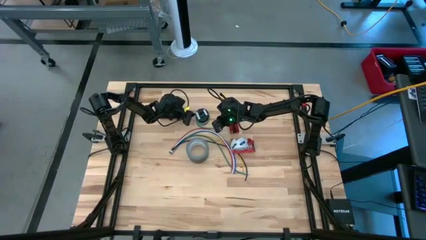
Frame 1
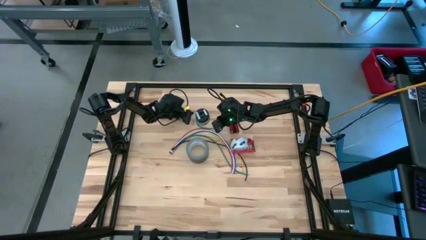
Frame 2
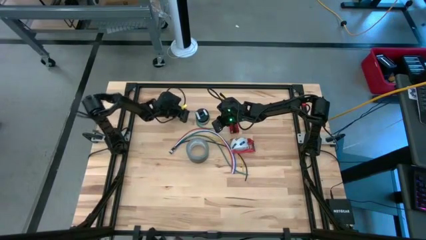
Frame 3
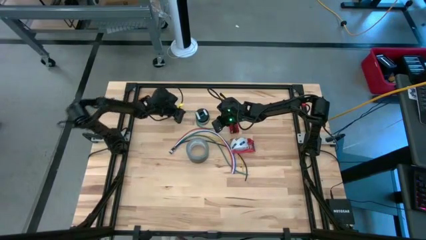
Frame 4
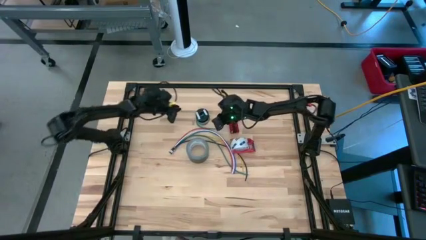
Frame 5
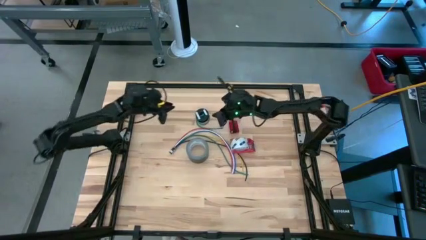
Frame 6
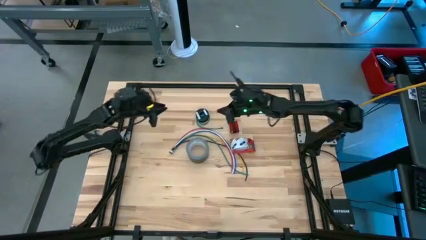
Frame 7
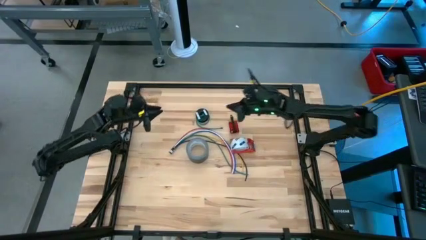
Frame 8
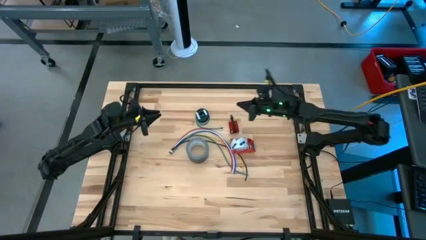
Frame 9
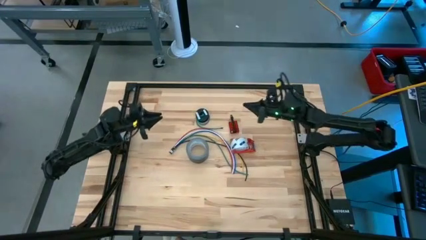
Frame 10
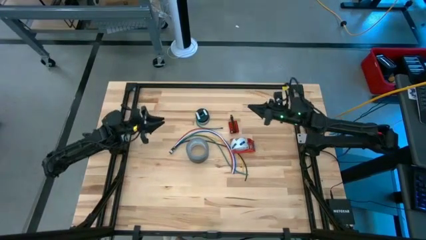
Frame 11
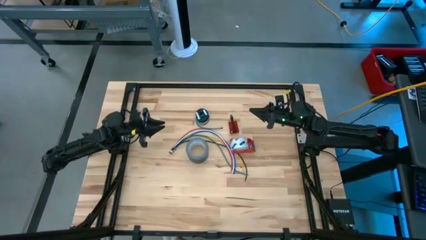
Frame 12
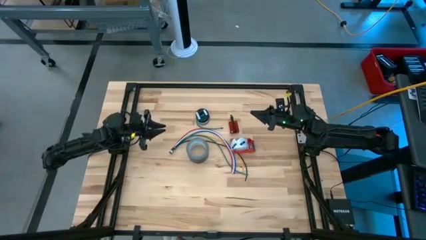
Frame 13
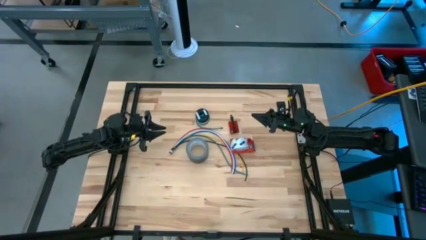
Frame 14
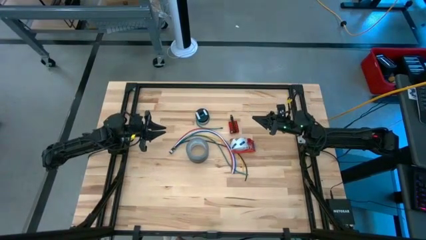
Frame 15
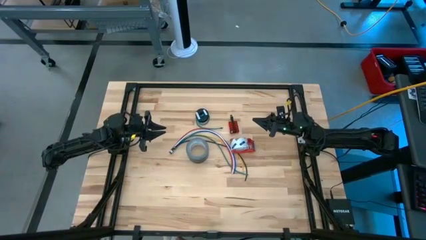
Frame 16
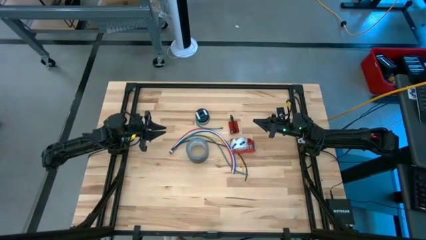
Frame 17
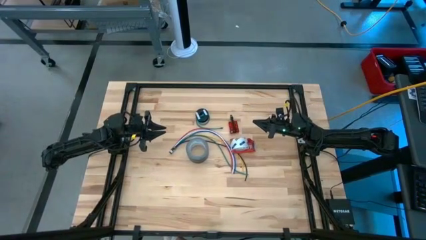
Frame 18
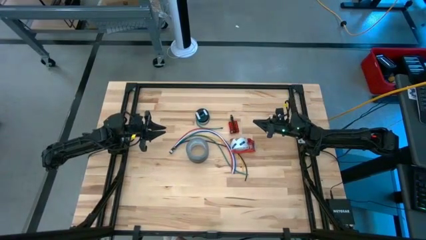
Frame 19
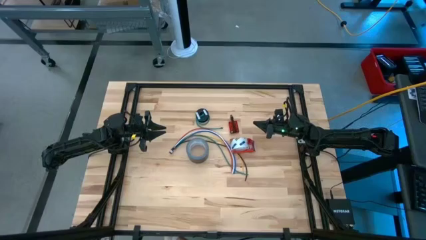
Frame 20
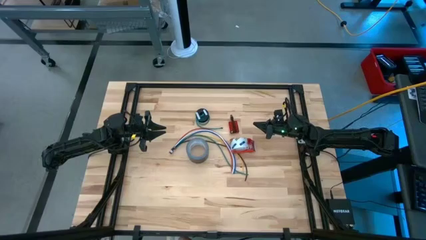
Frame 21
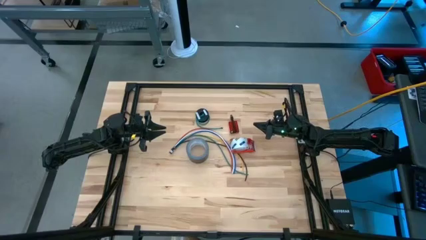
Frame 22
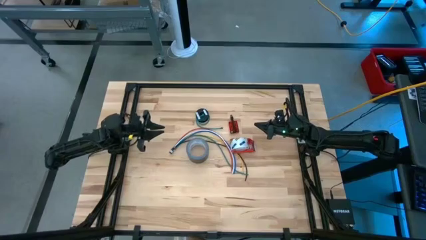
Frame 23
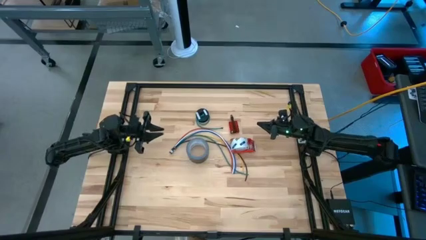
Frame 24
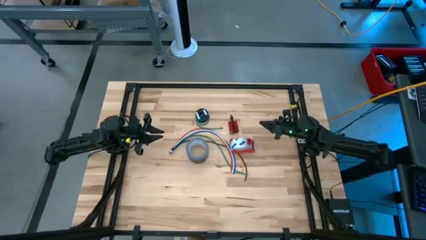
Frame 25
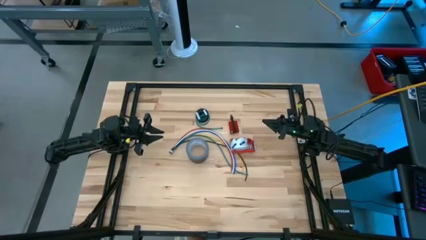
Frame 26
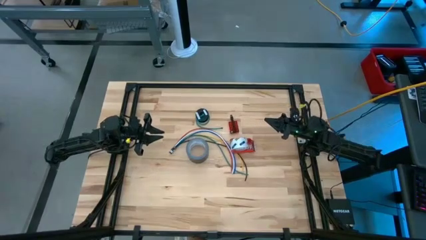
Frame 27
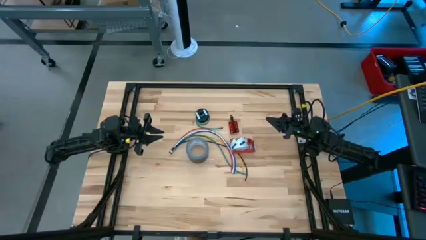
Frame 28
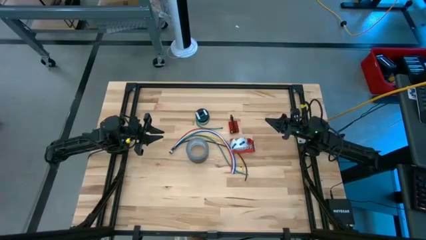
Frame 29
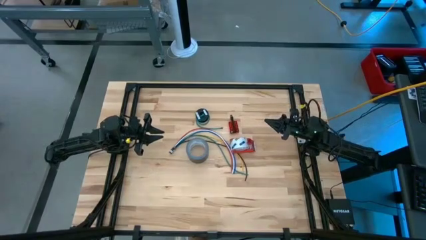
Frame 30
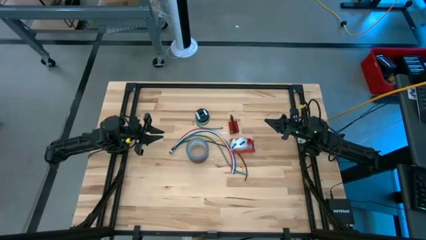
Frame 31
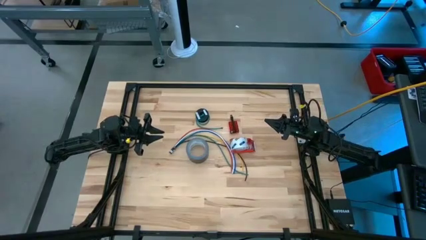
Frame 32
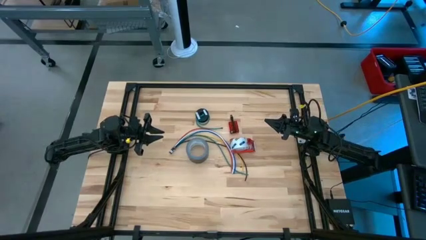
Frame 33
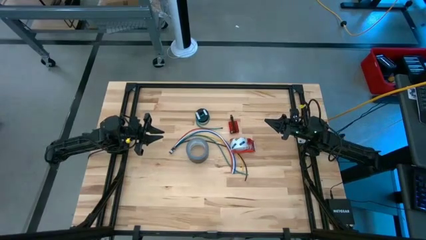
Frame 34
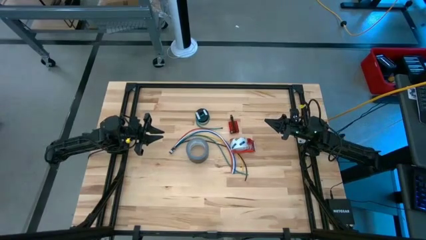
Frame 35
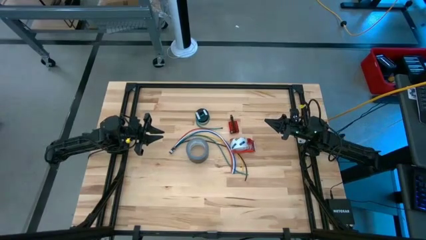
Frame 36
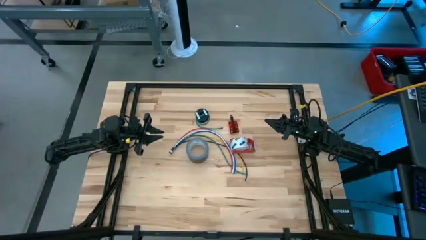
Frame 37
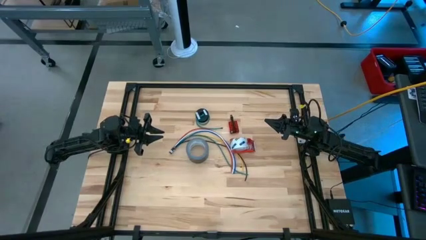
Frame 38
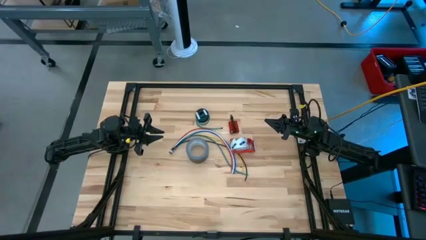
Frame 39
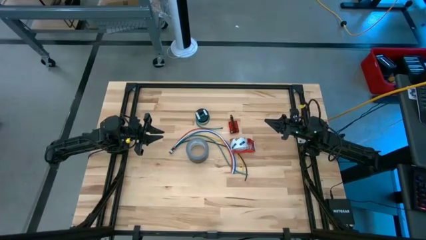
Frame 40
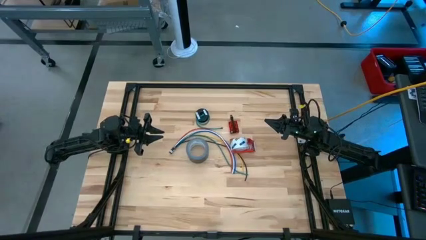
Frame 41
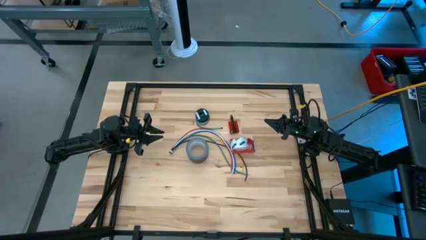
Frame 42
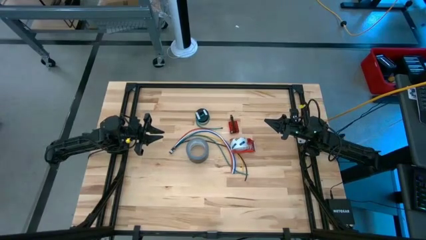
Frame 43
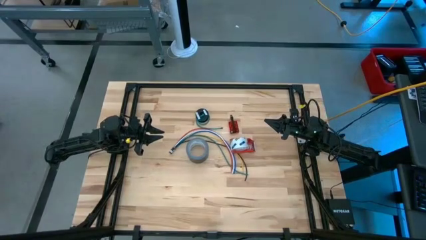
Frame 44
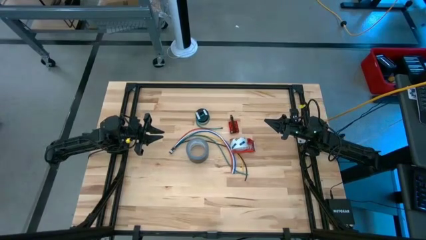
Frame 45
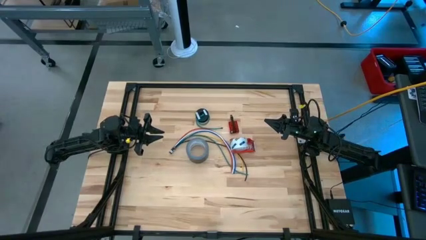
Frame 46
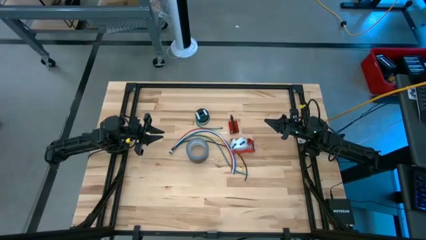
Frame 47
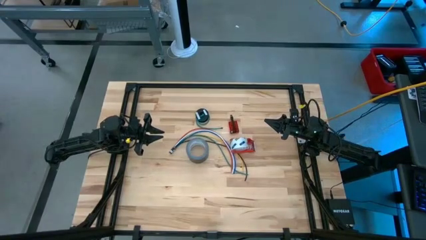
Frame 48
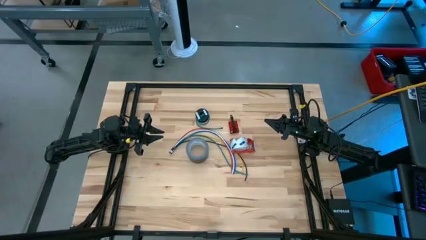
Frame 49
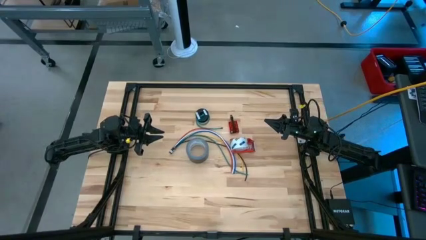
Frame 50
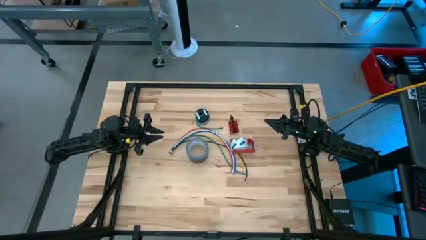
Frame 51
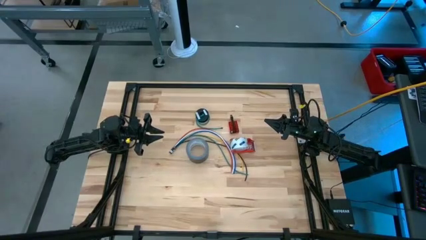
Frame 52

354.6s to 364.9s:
Task: Coil cords
Return to Home Position
